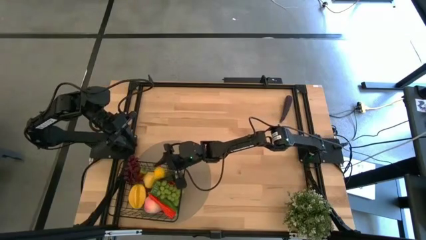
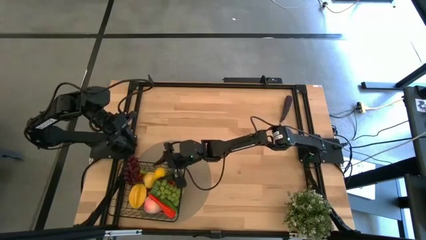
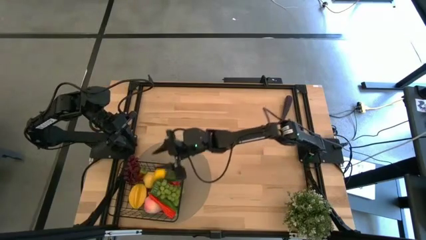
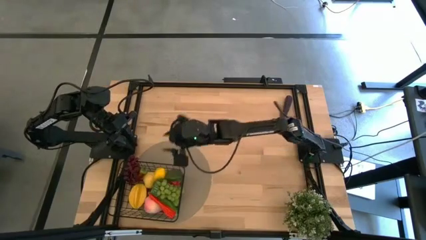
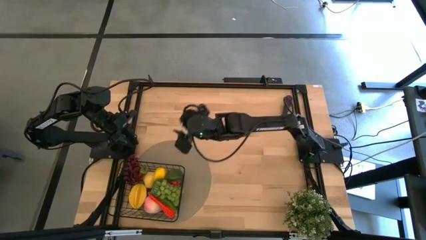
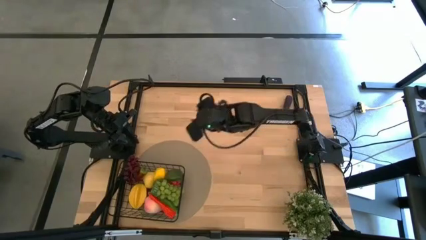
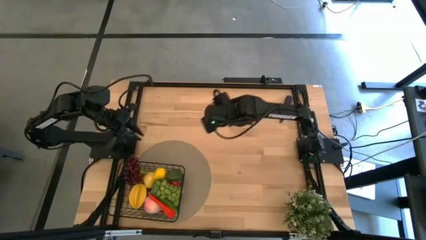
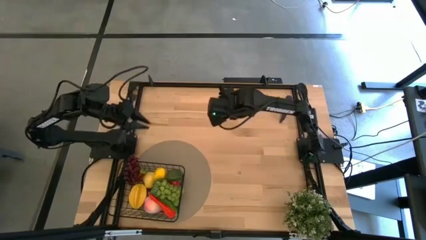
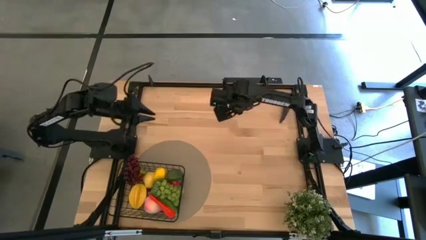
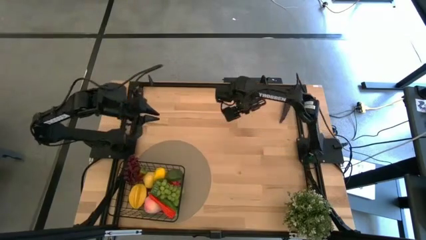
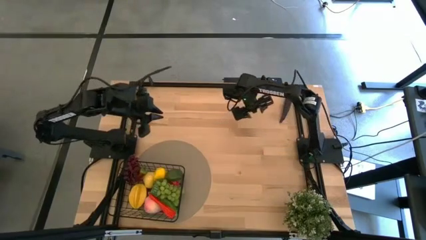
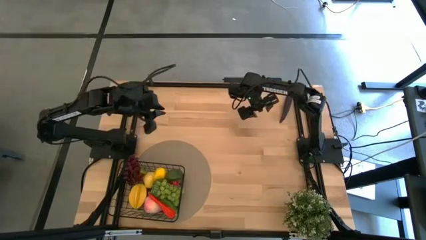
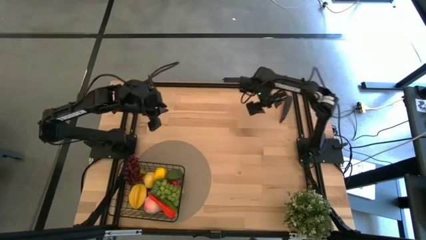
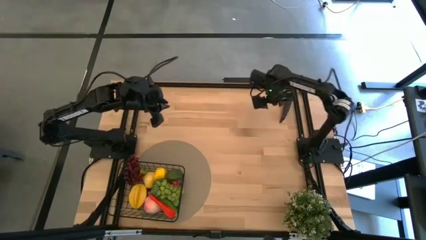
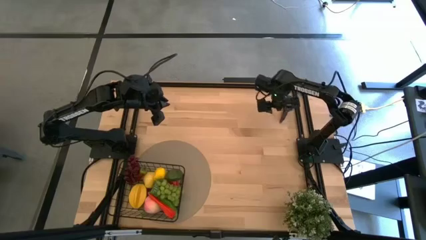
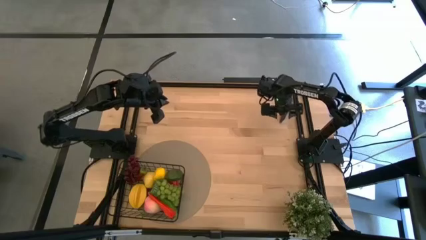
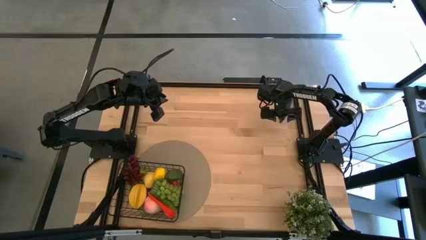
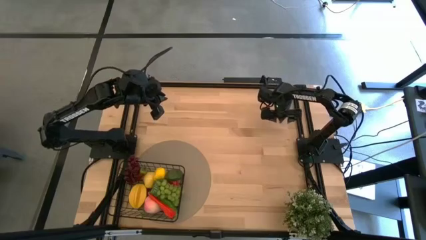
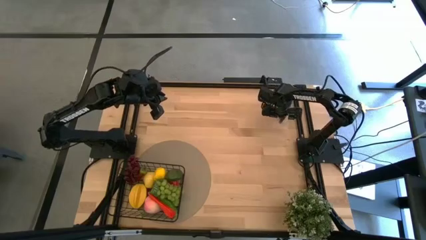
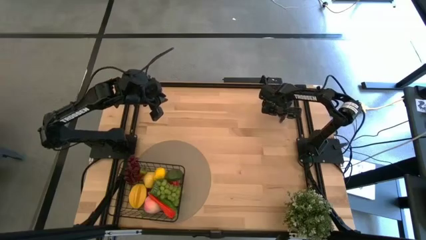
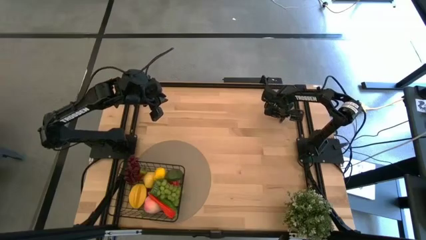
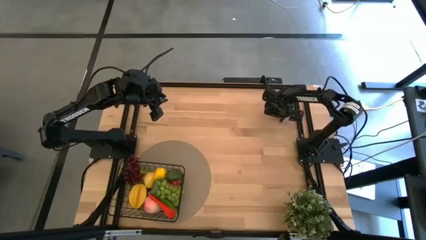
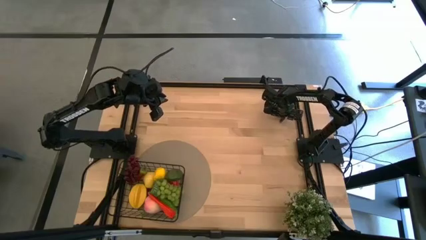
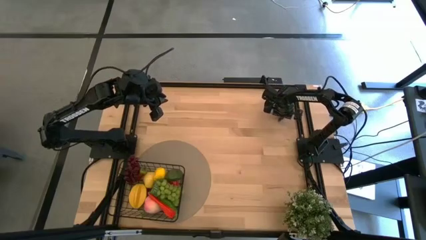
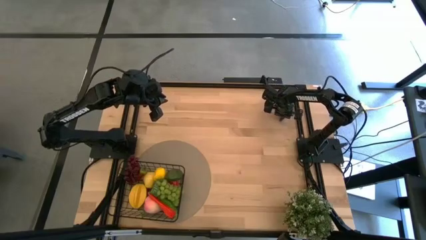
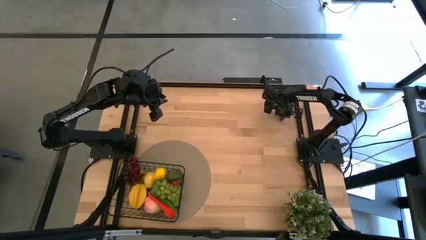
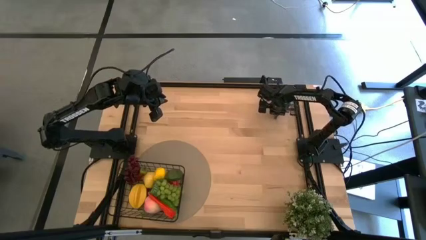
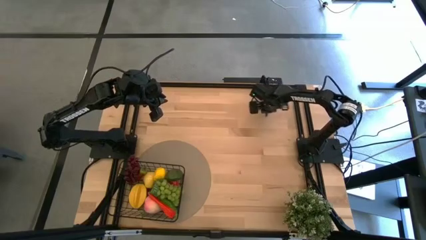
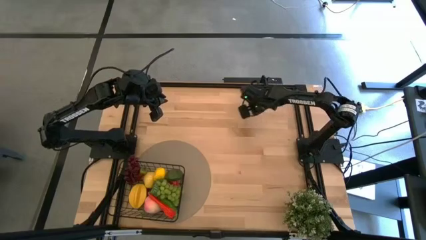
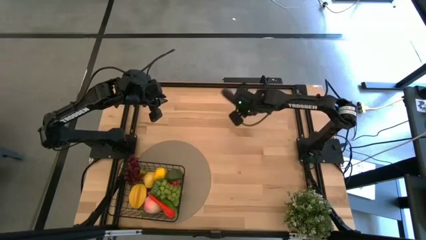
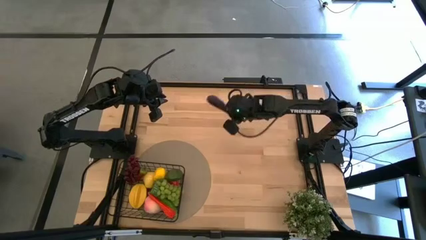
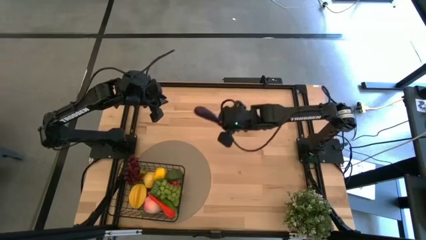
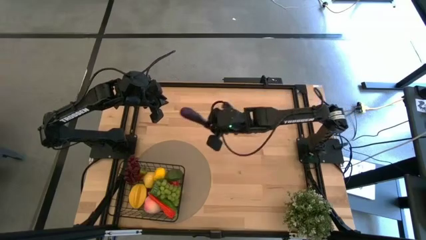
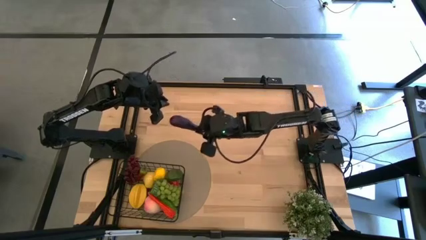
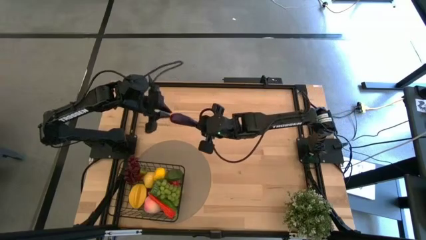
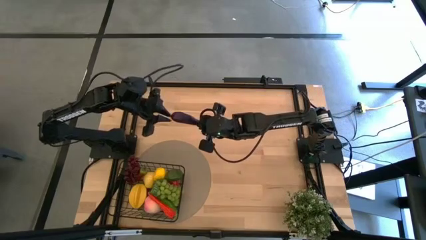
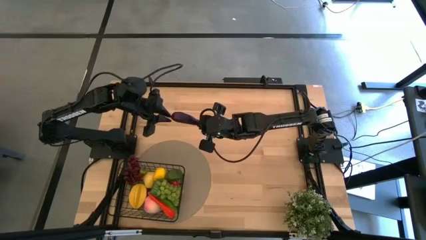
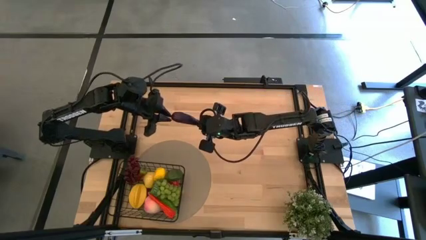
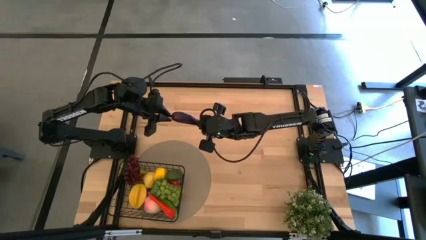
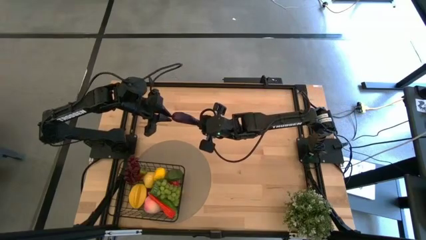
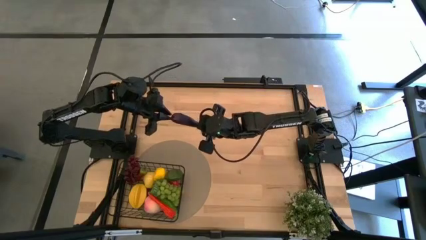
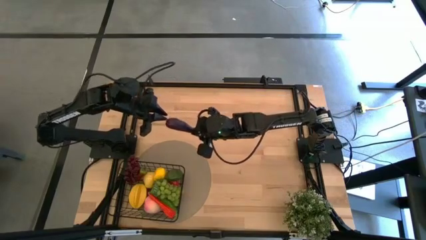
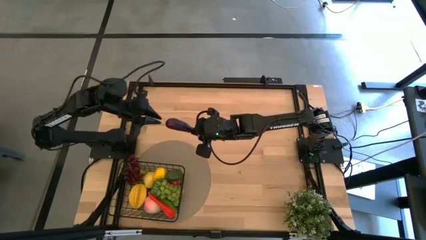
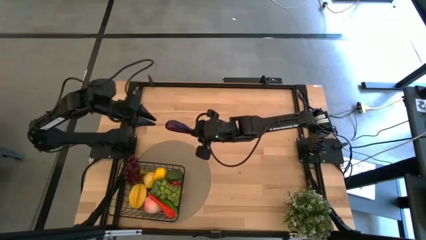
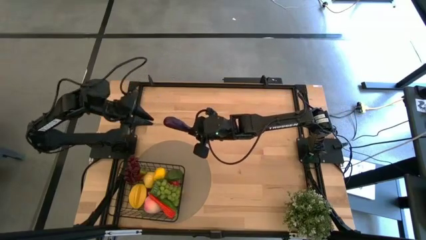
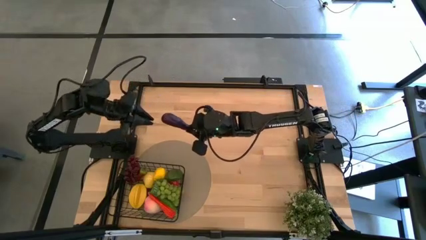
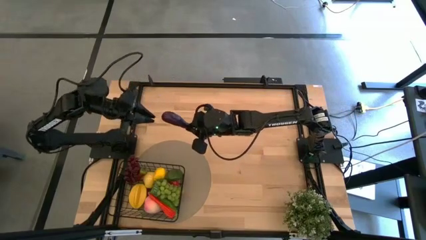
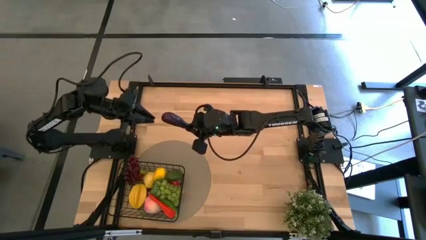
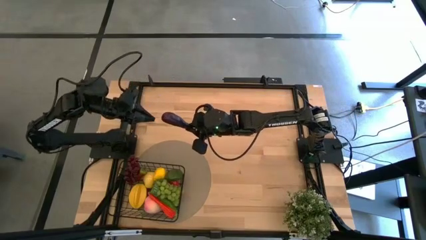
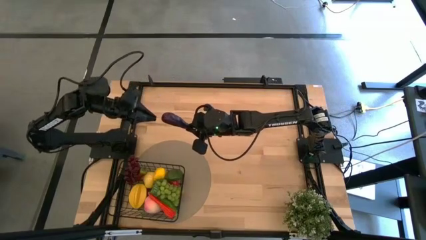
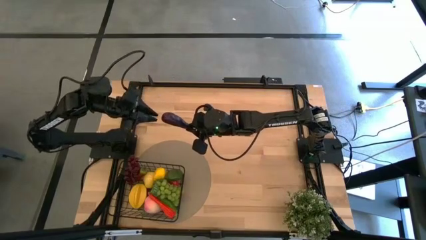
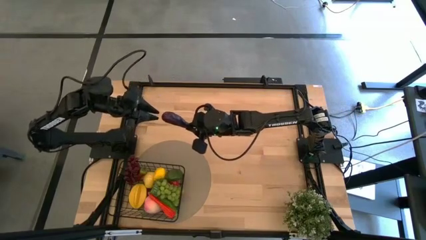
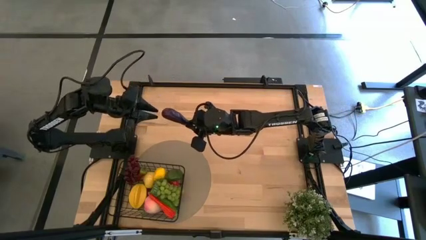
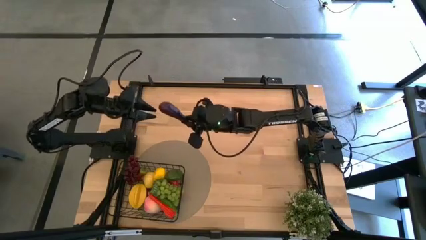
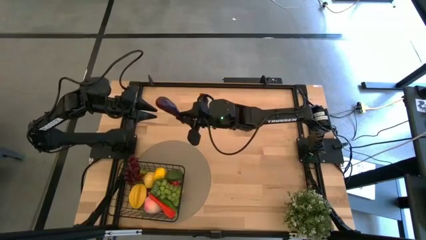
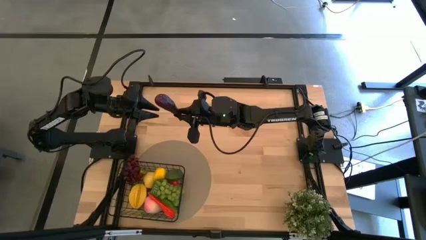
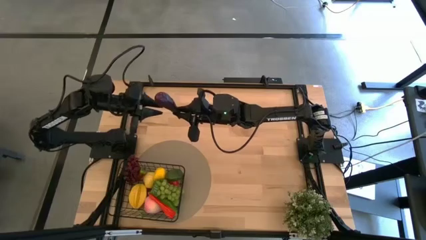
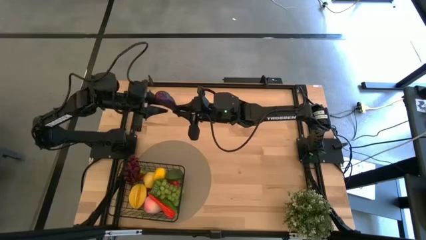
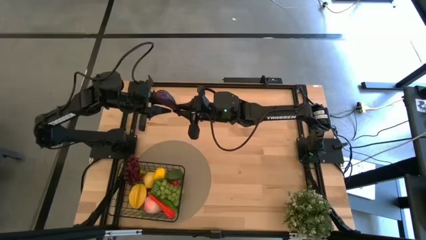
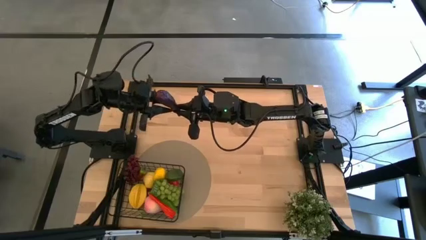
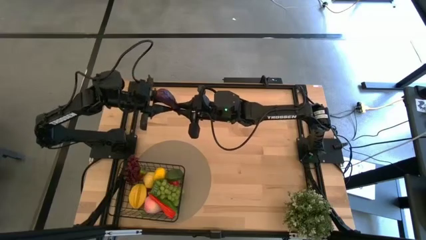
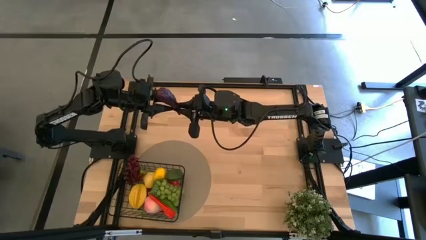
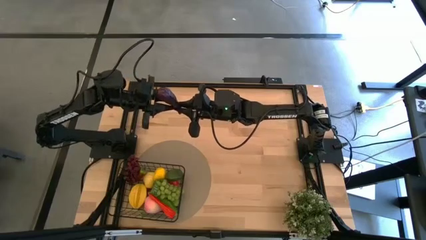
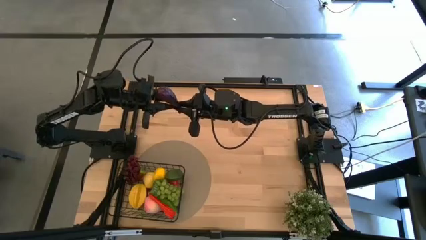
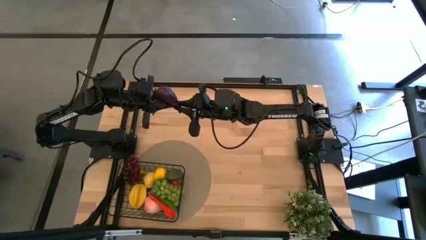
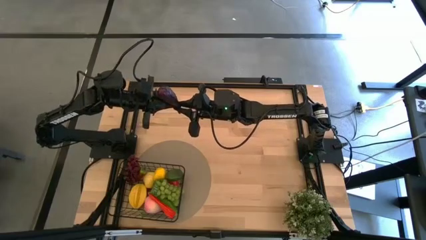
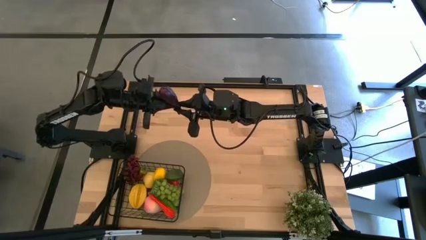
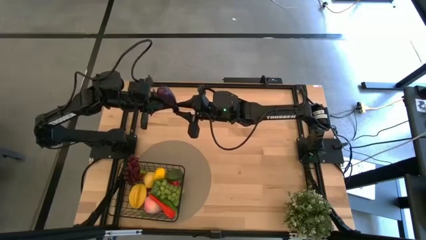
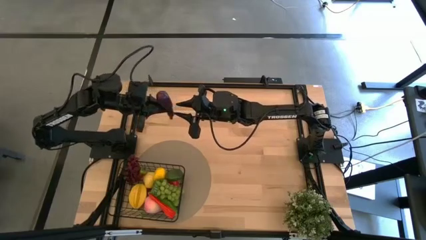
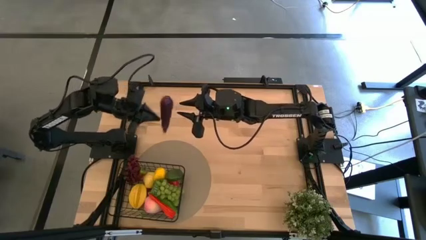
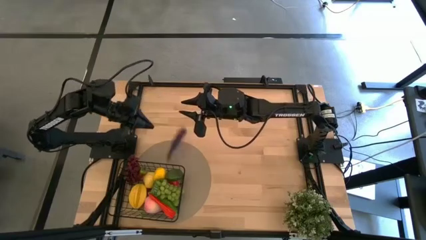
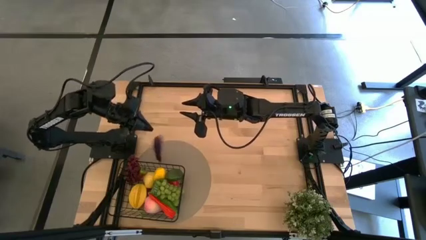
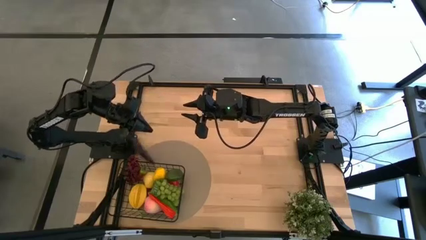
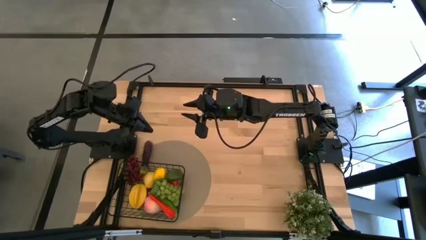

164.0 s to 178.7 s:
Task: Build produce basket
Put the purple eggplant into the wire basket
